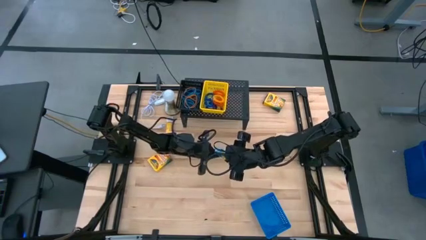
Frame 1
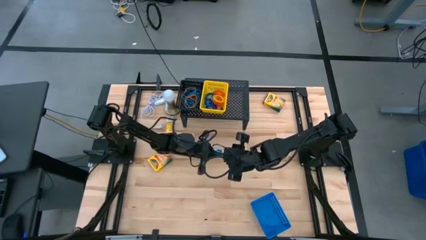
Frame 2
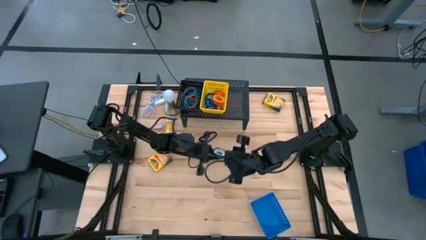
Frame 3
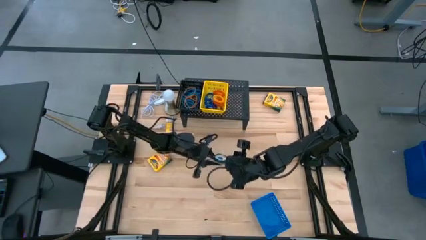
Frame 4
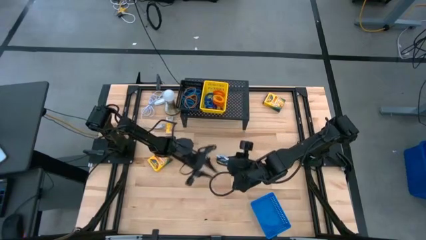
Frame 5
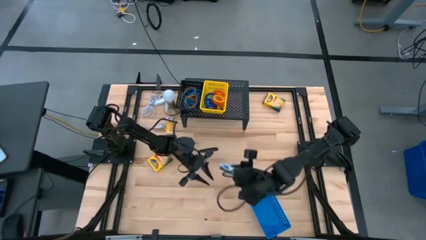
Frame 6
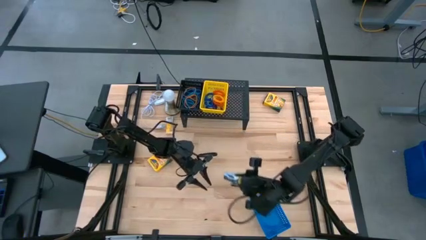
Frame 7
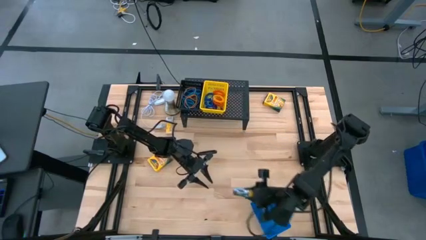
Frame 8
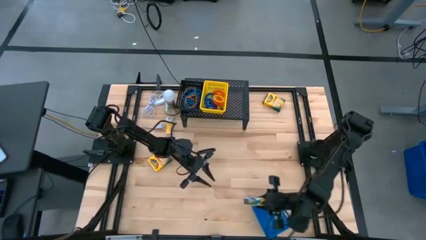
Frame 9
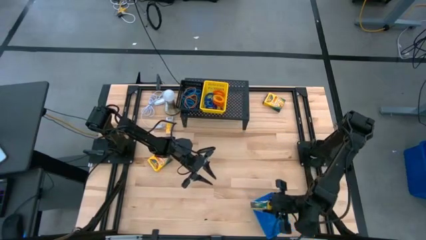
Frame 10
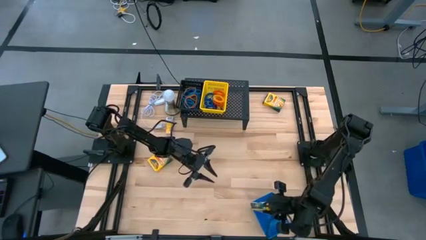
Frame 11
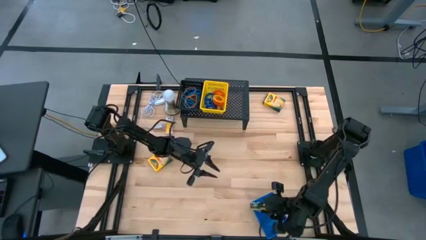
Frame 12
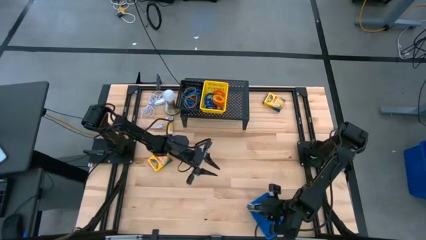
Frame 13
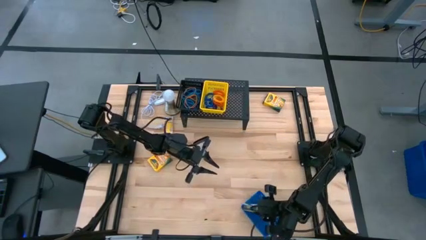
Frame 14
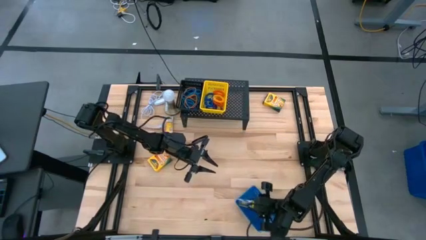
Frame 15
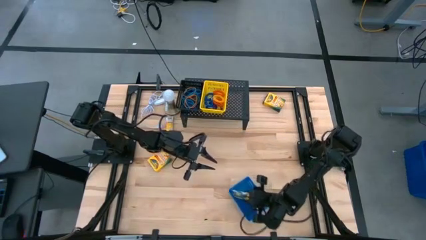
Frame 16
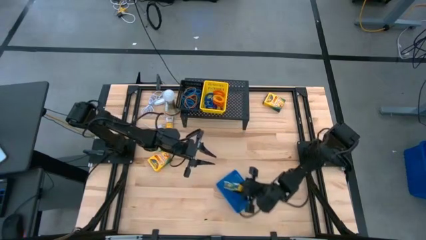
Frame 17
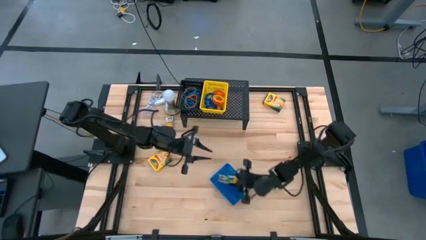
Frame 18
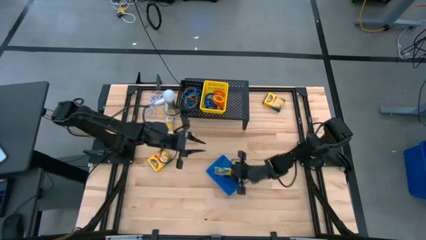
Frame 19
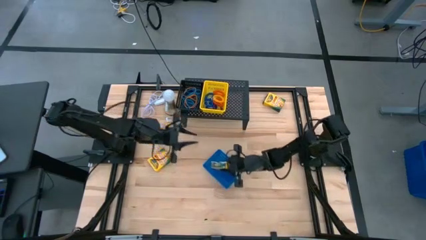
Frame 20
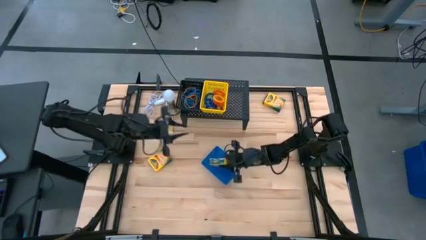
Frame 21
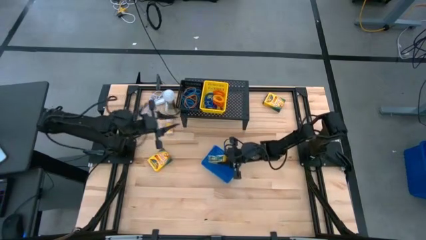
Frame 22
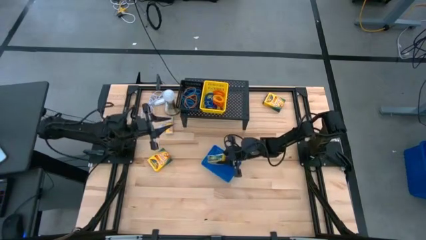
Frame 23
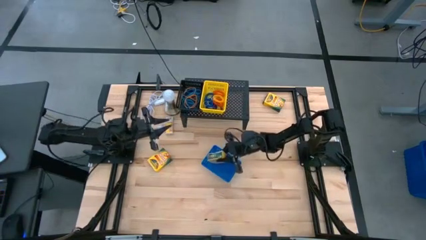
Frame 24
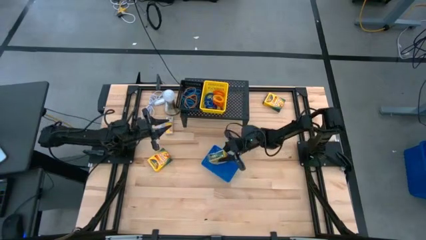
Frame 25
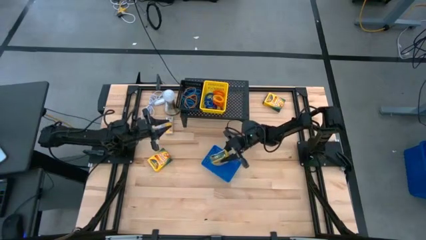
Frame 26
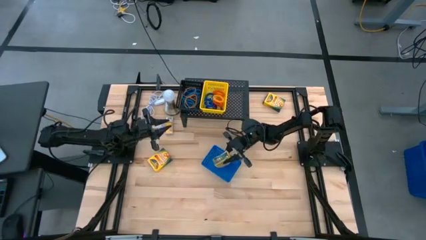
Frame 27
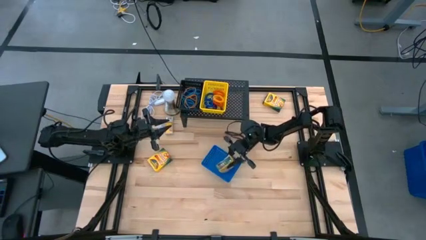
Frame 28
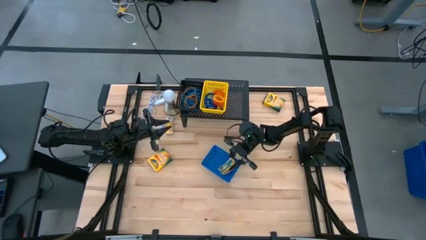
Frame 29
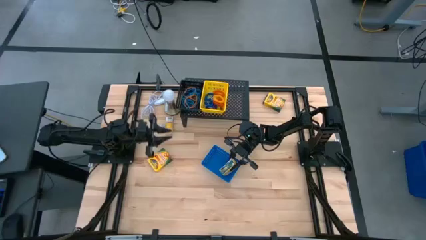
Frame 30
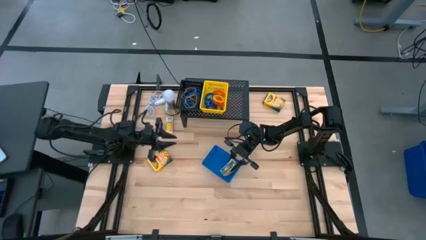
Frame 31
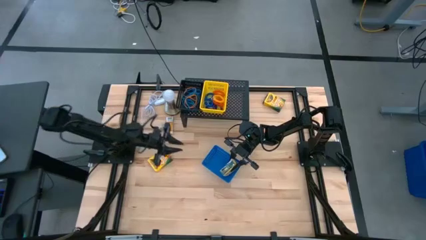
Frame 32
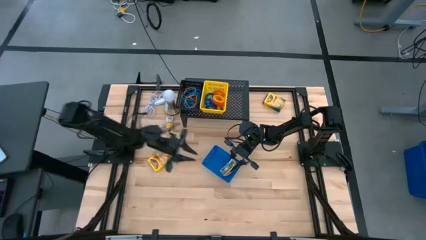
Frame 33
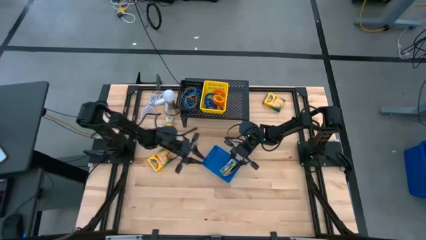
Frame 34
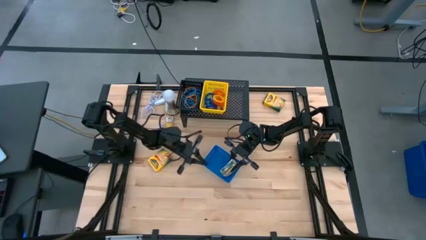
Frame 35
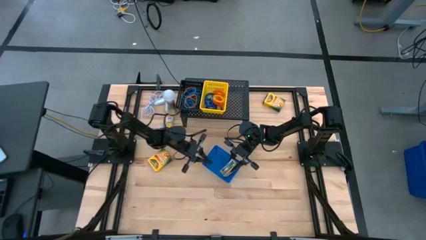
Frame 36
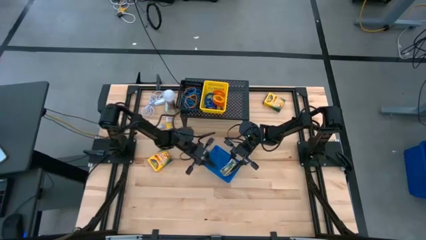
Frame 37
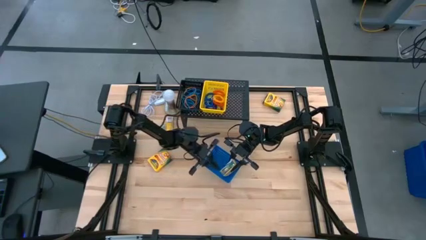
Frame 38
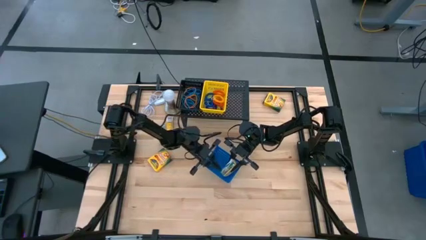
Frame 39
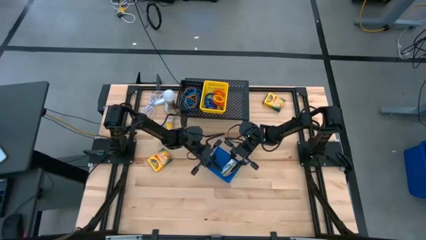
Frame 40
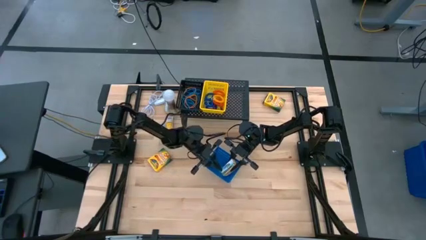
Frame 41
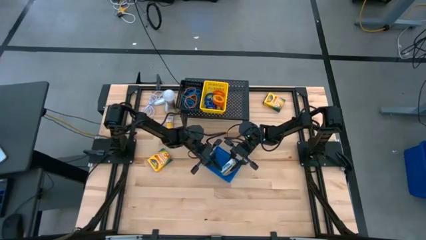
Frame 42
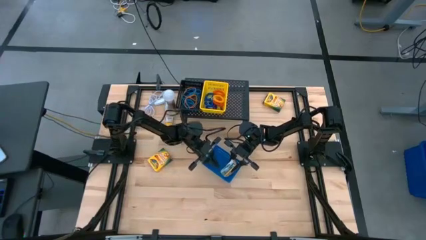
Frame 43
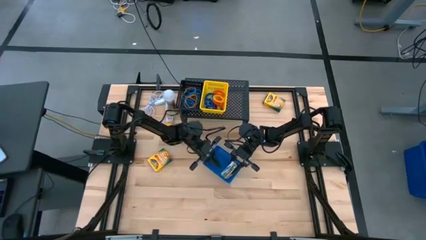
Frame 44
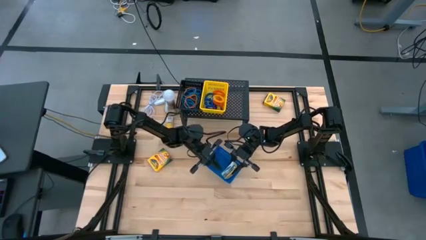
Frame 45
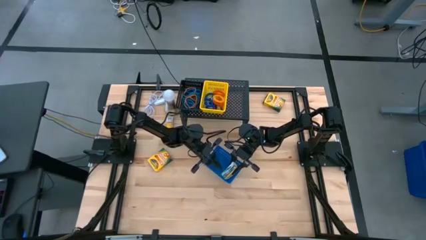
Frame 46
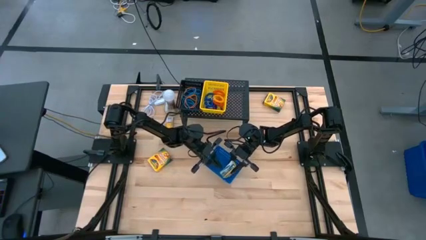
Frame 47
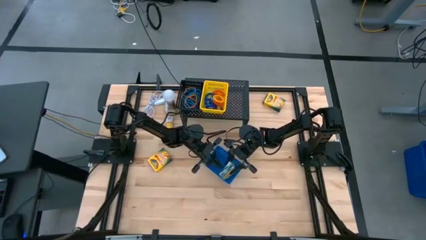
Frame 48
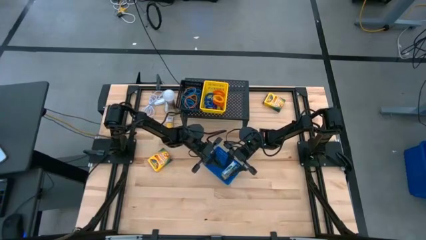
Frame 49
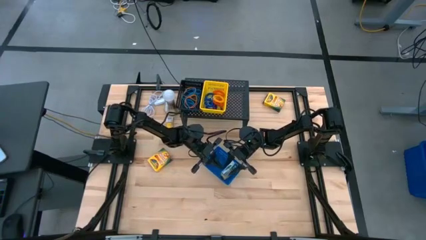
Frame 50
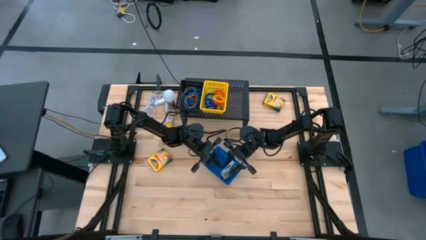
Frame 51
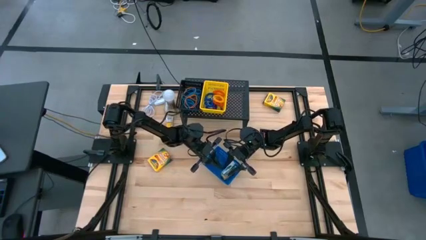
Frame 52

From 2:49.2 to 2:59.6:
Task: Pick & Place Office Desk Supplies
Put the big yellow crayon box into the blue basket

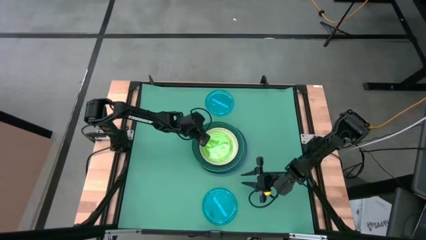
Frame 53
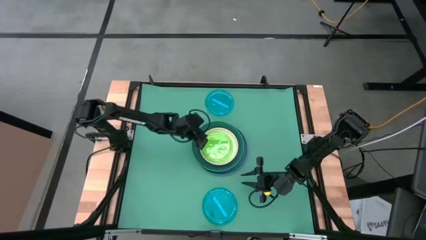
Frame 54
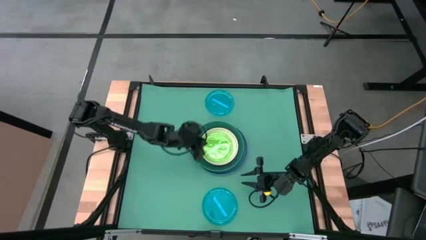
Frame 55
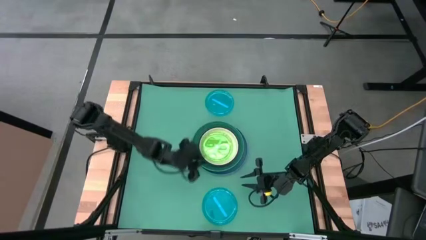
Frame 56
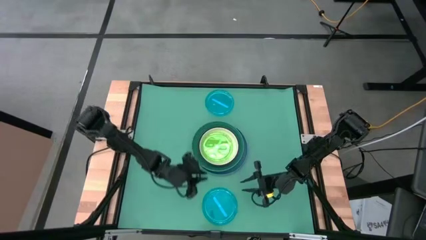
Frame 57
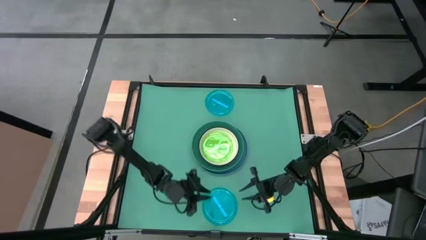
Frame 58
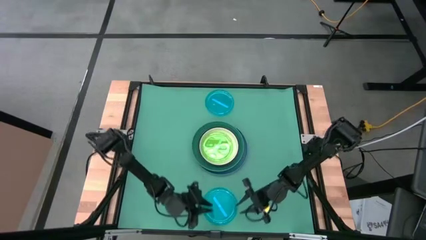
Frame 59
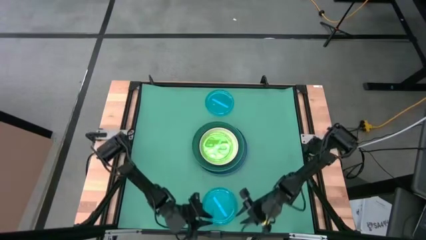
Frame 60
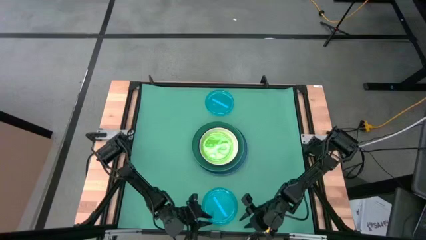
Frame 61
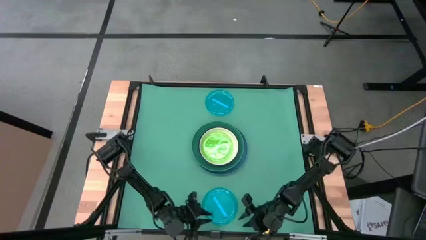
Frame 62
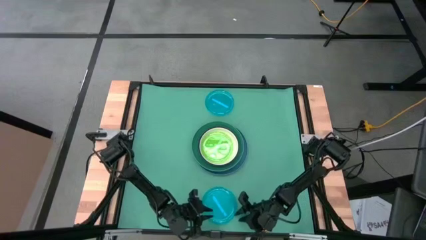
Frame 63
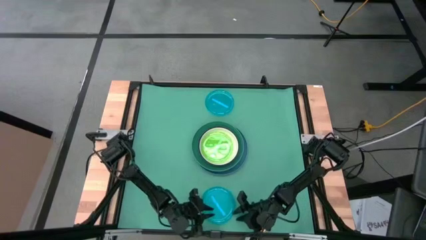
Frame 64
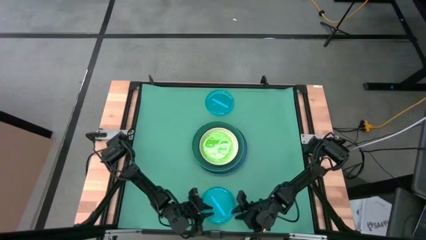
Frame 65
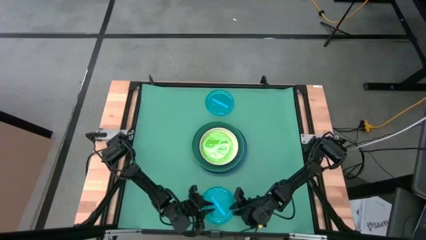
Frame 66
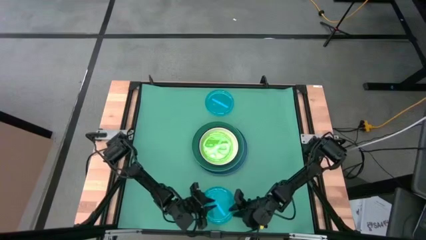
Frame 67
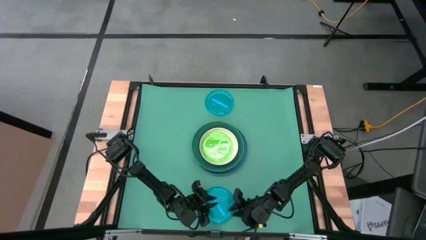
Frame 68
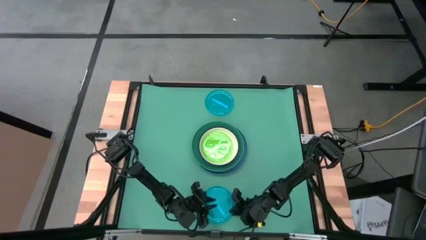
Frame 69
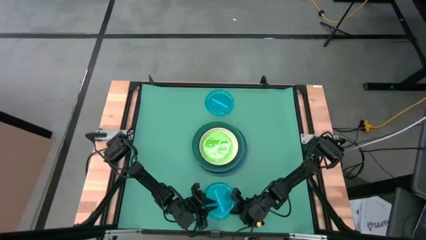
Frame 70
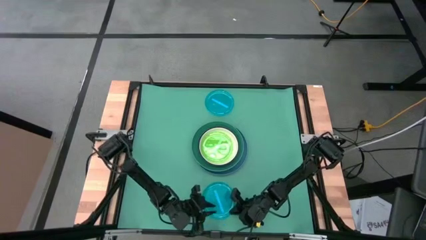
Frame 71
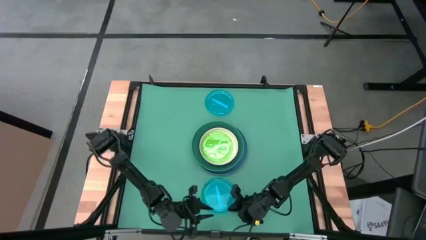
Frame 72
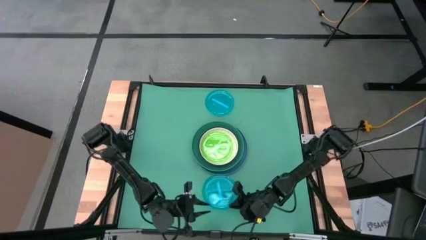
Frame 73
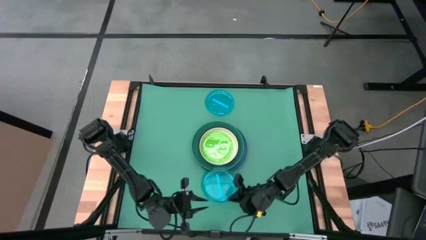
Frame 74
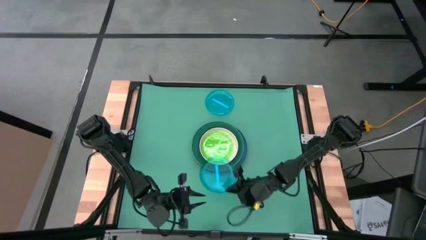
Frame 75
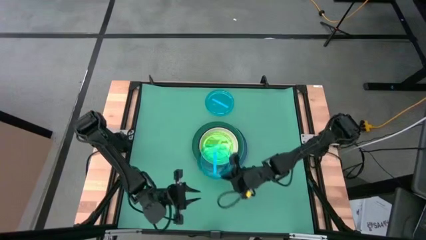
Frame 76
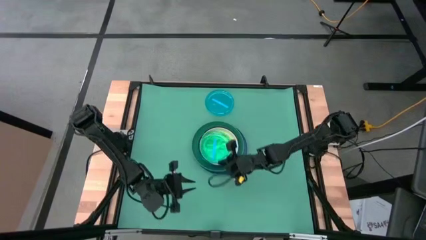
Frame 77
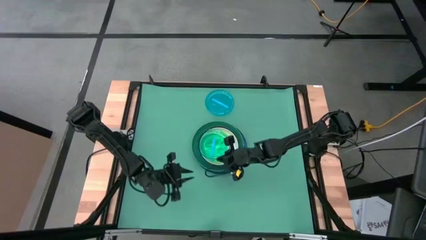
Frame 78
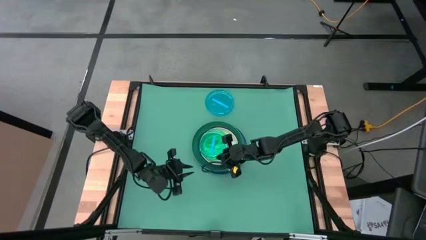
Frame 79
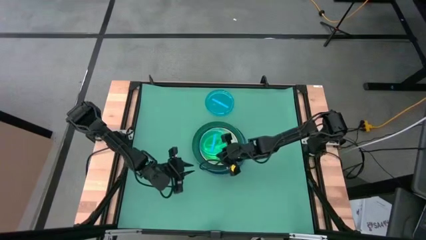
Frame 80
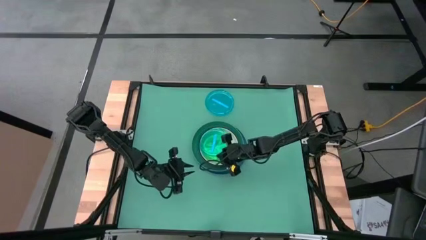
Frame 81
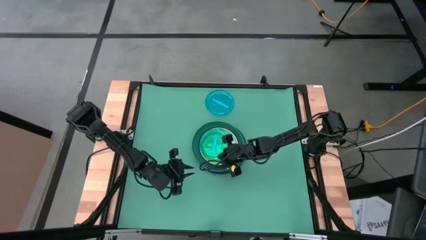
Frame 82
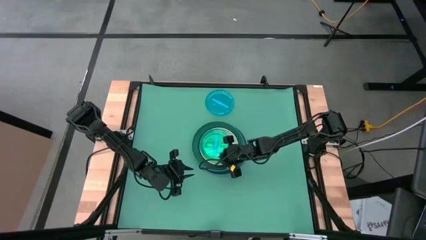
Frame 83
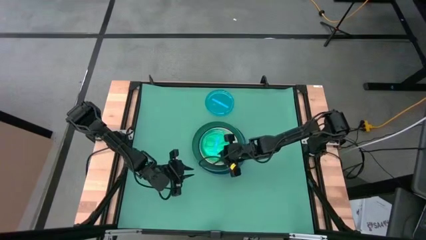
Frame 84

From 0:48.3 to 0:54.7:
Task: Stack plastic plates
Stack the bottom blue plate on top of the green plate
